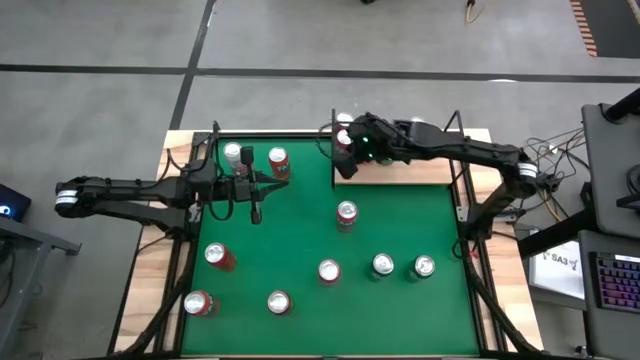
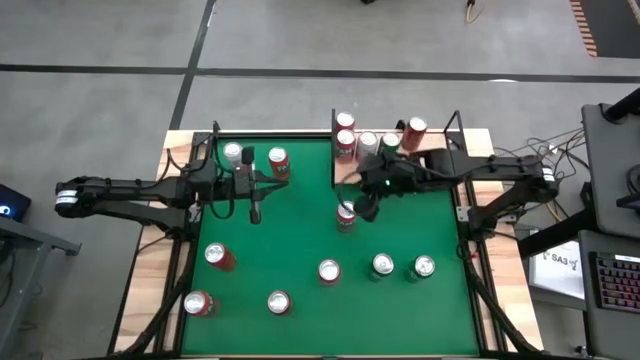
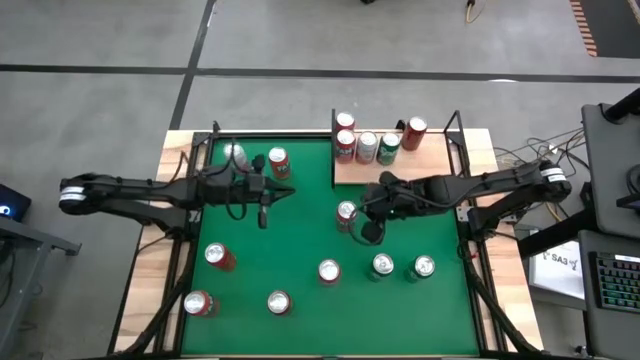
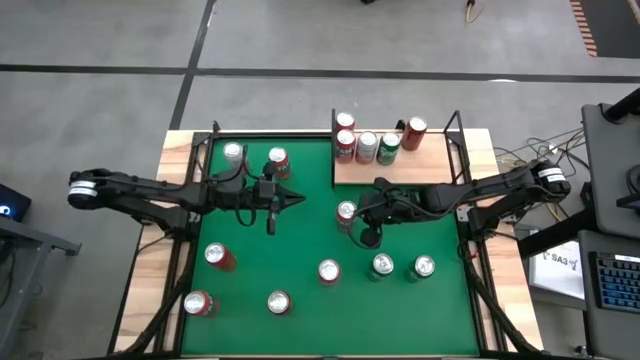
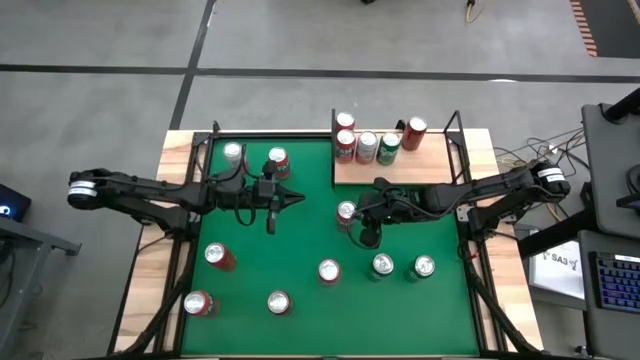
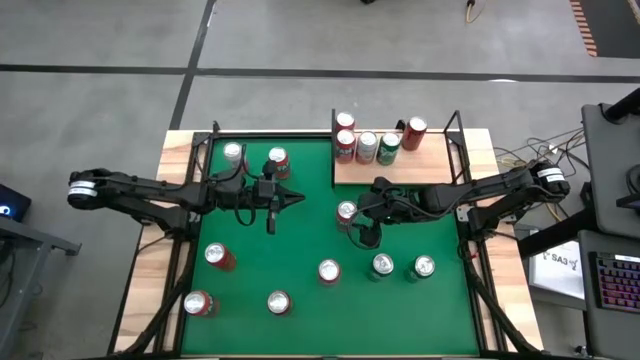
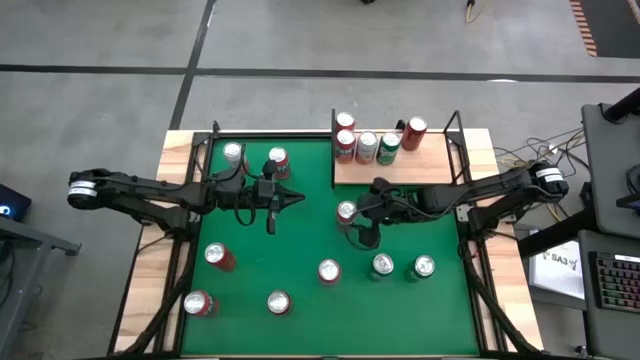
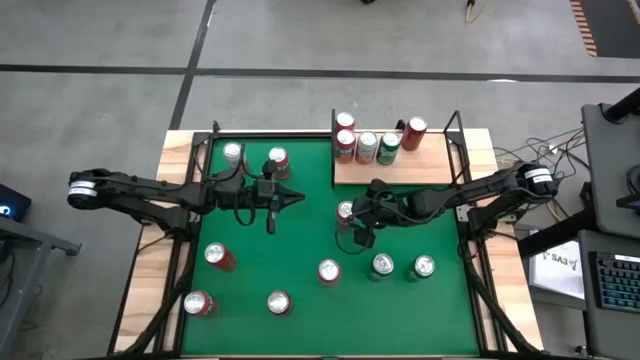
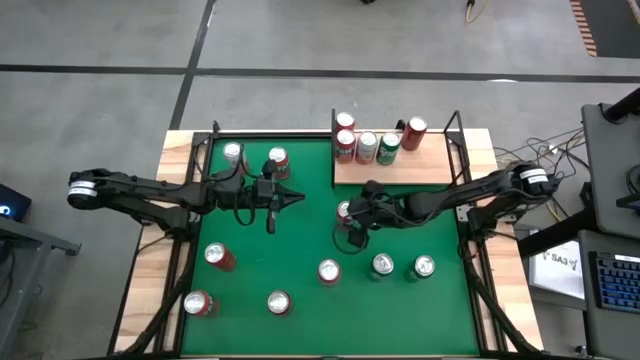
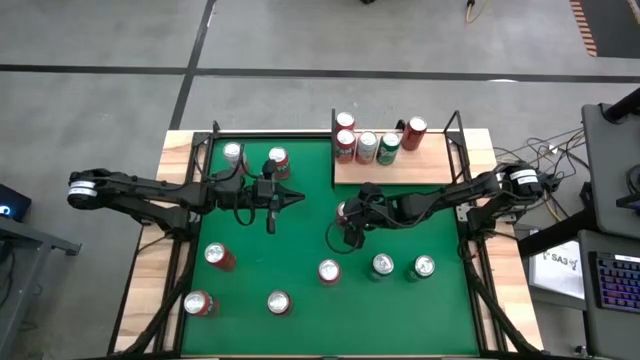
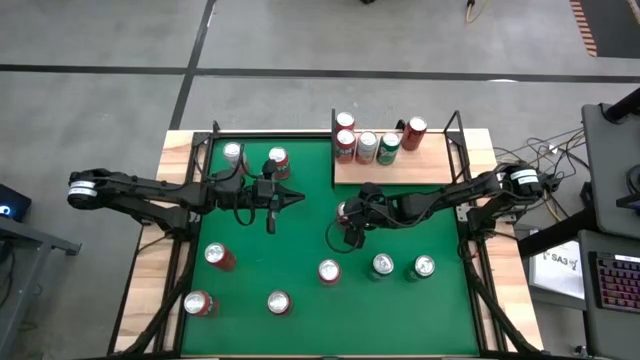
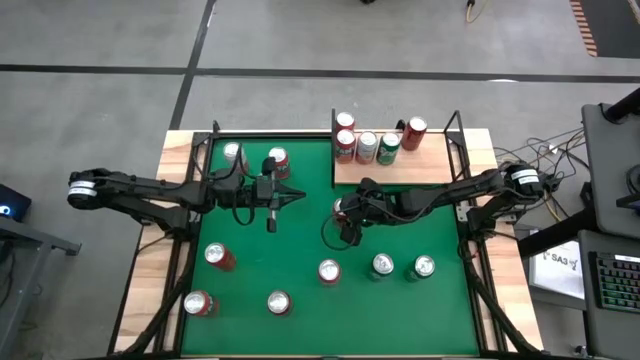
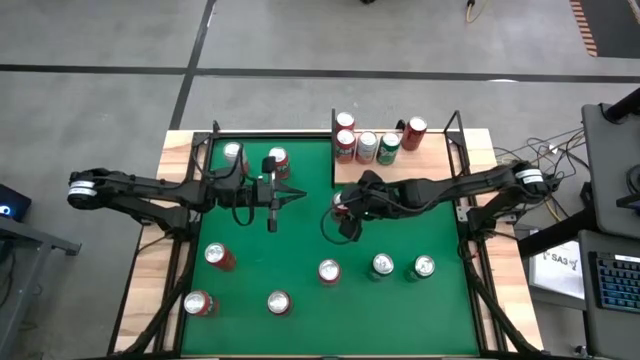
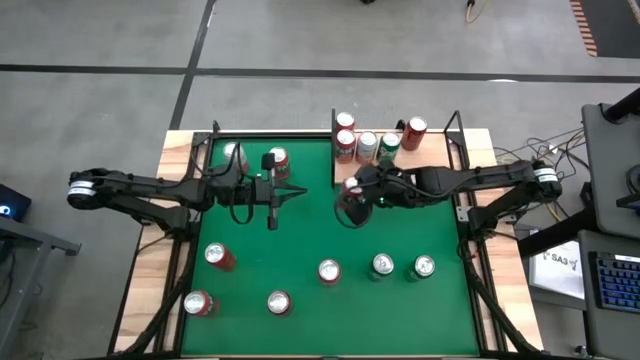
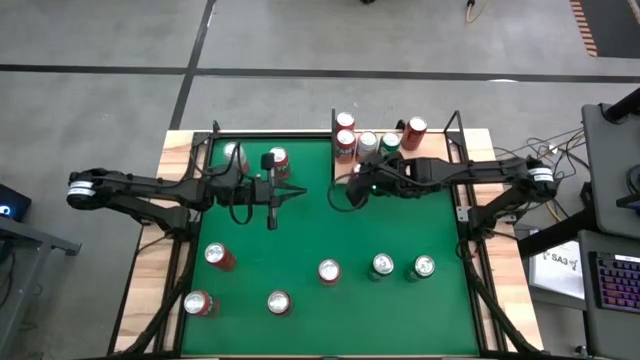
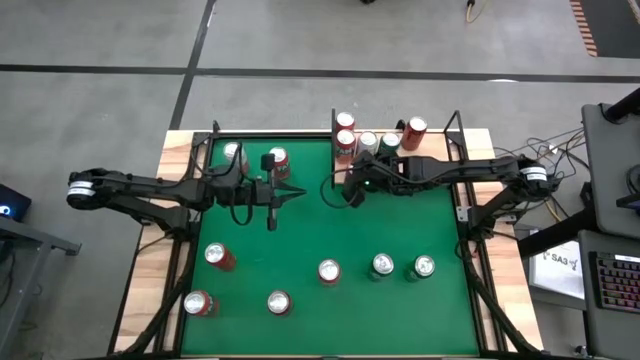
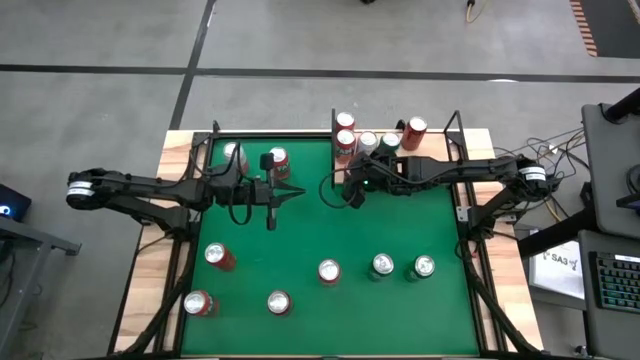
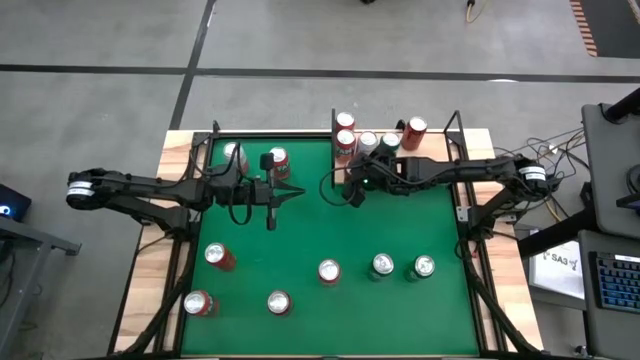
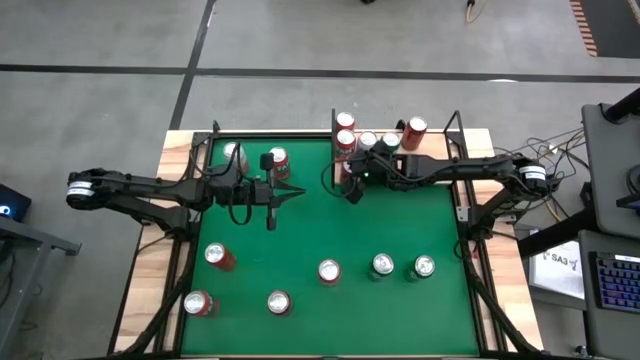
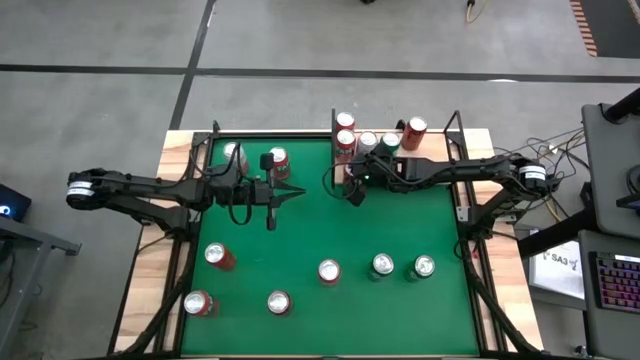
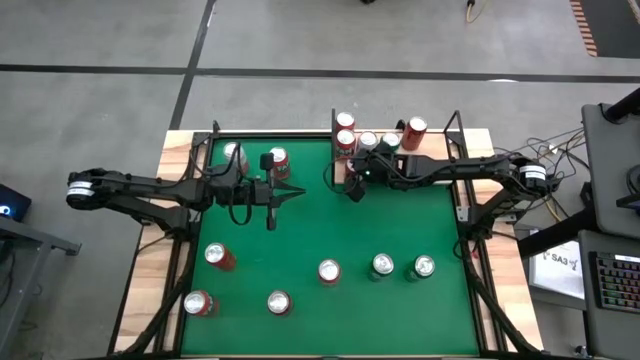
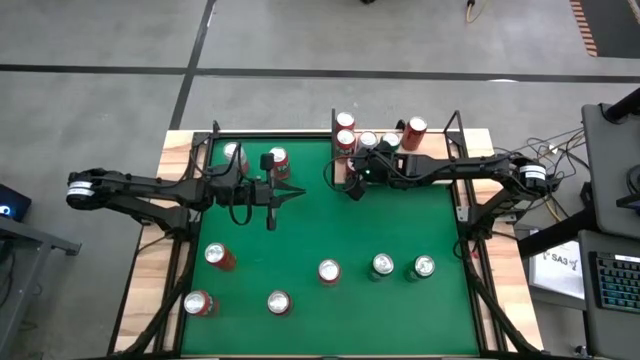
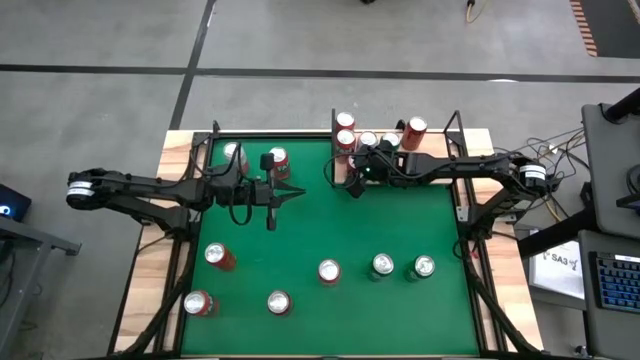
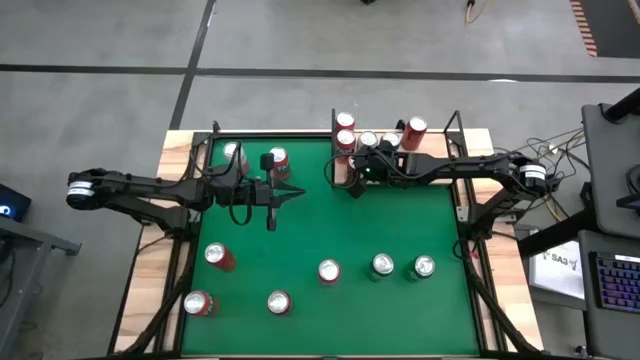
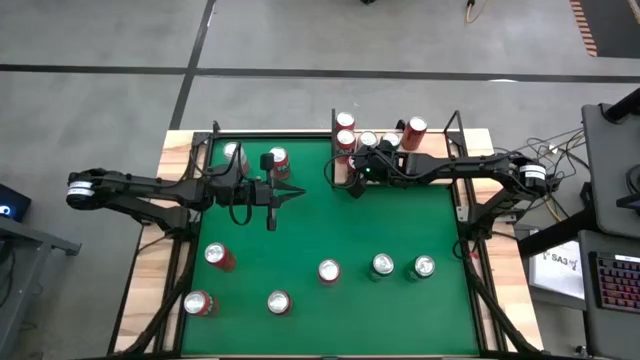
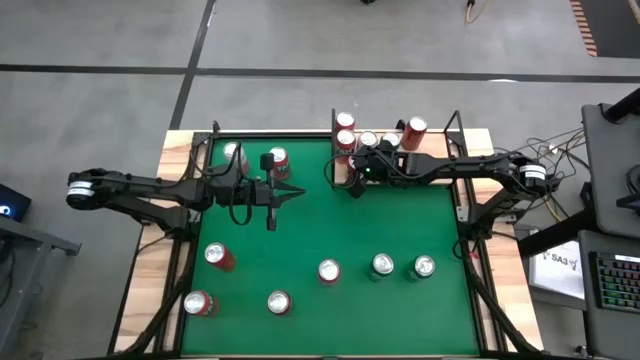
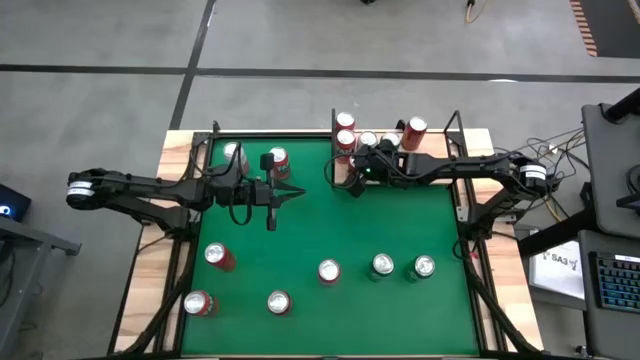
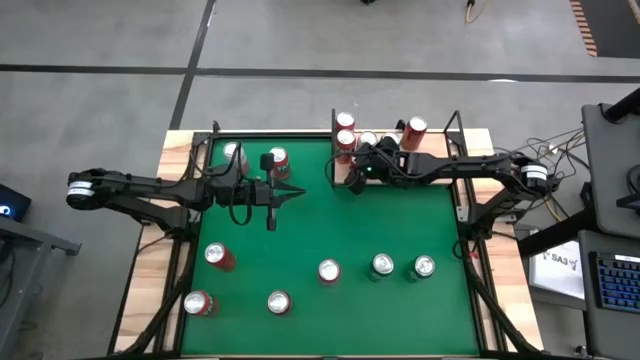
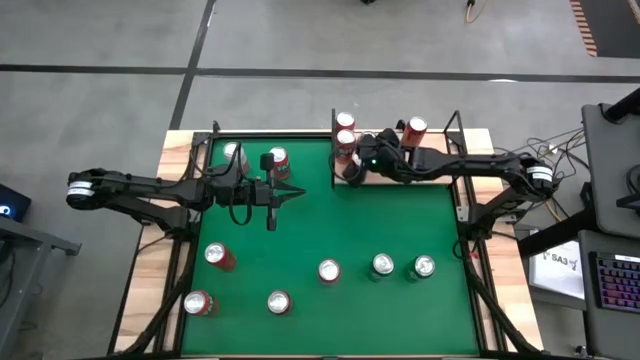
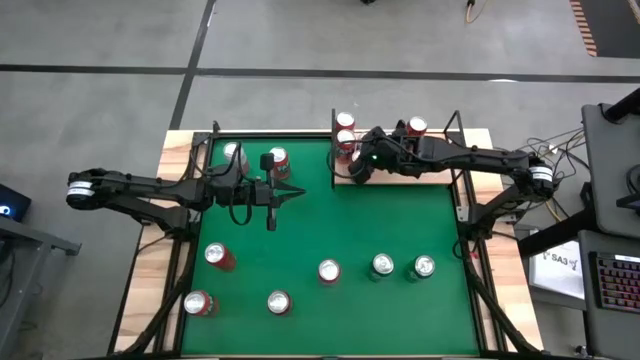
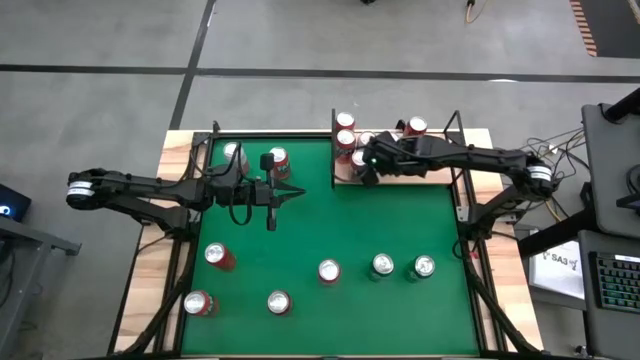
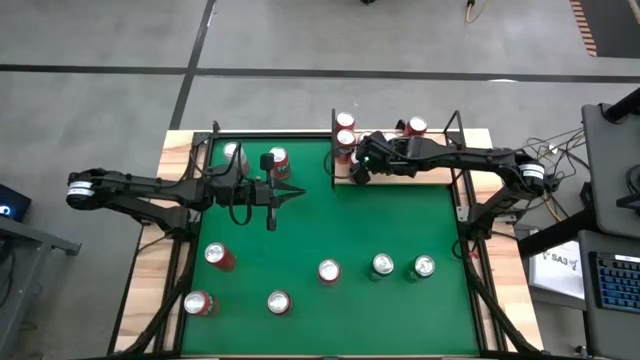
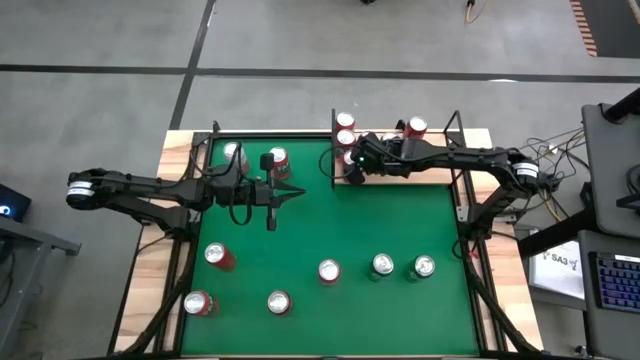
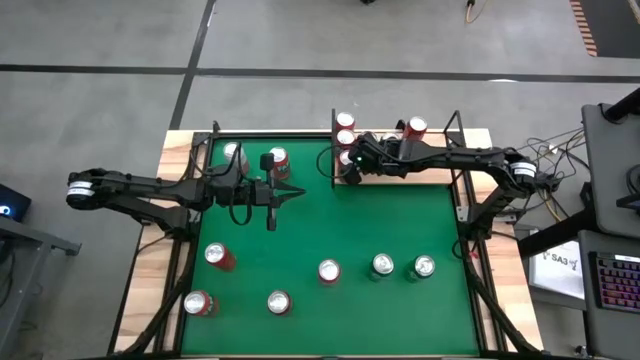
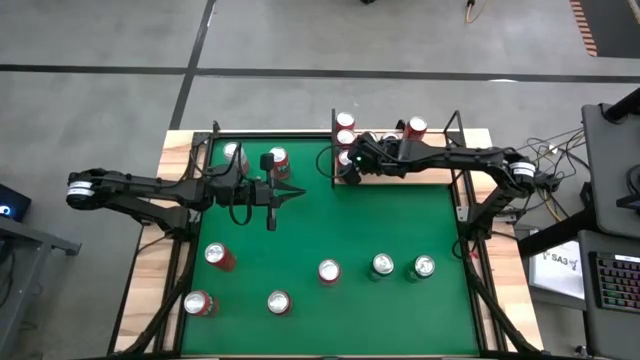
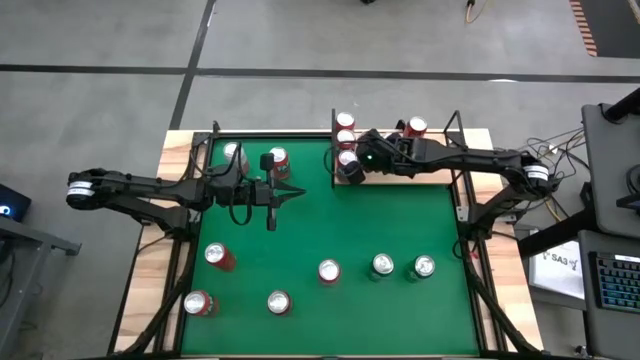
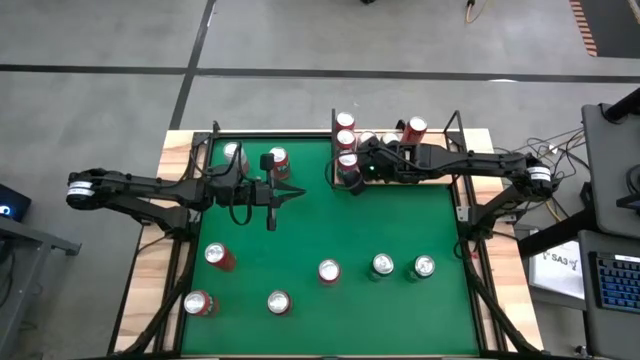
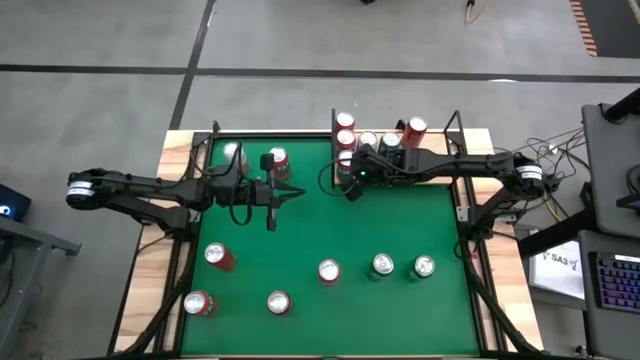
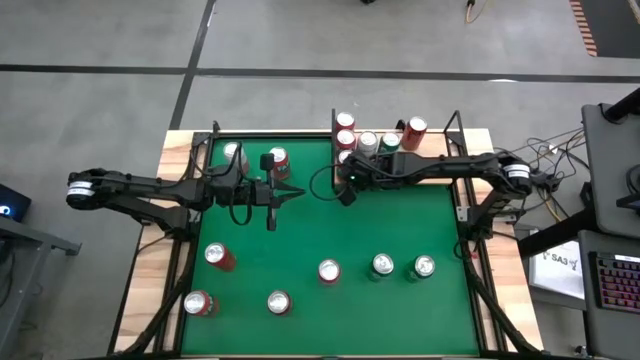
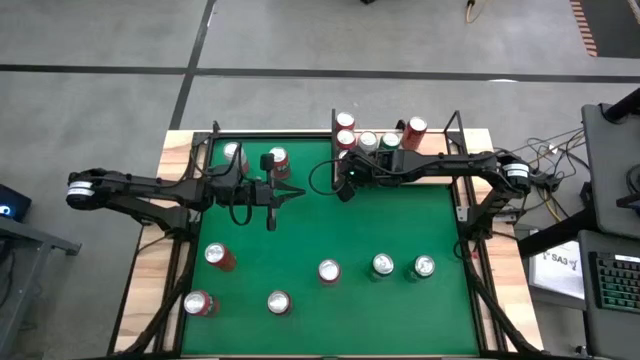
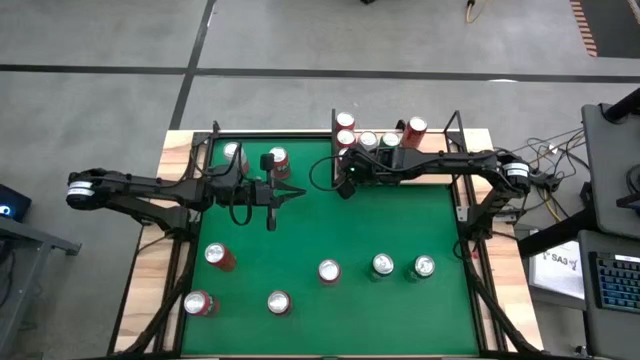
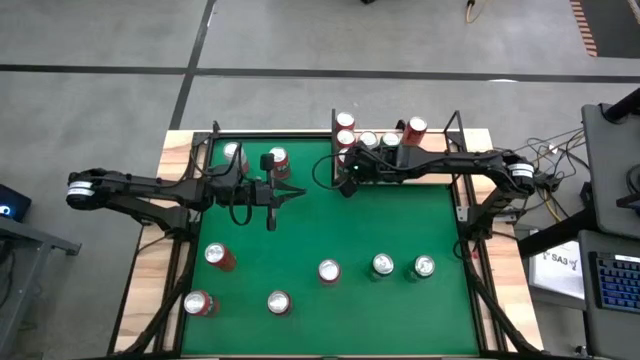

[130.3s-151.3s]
Task: Place canned beverage on shelf
Put the red soda can on the shelf aligned with the other red soda cans
